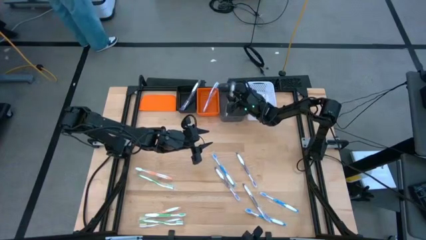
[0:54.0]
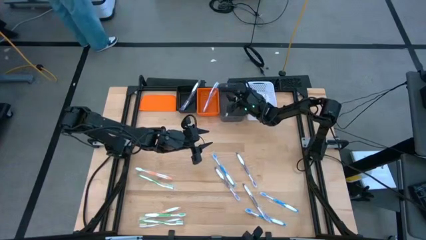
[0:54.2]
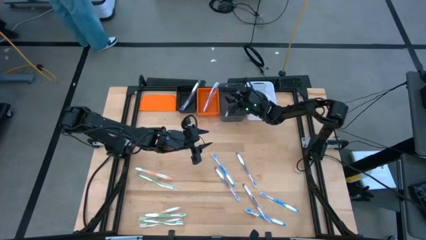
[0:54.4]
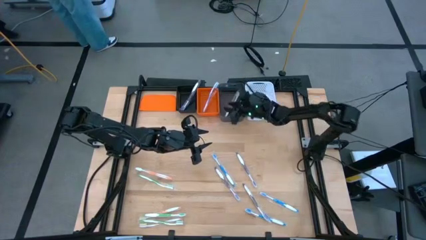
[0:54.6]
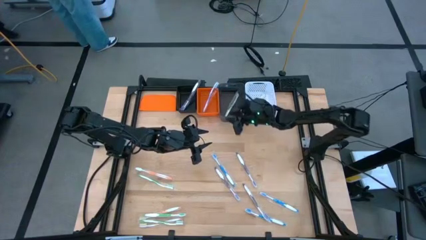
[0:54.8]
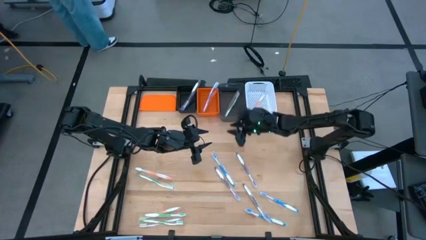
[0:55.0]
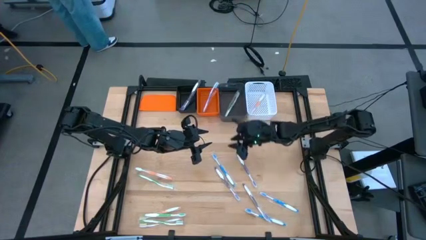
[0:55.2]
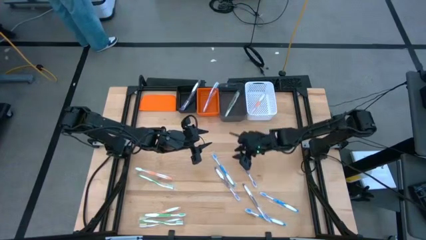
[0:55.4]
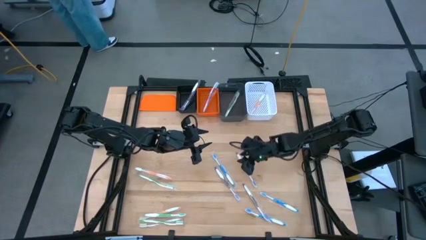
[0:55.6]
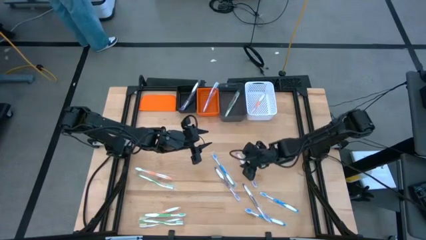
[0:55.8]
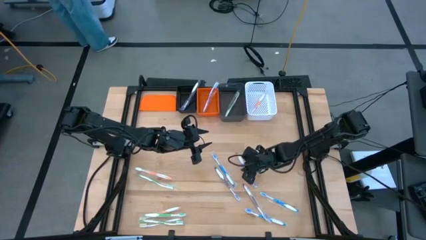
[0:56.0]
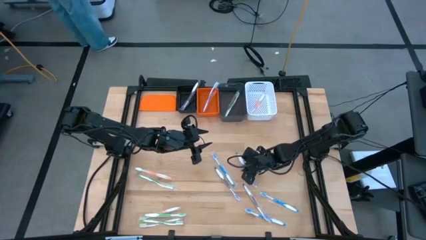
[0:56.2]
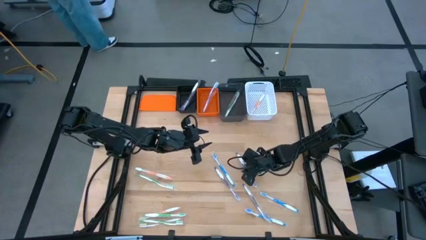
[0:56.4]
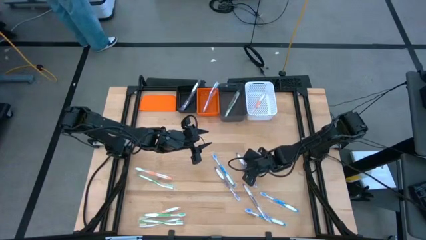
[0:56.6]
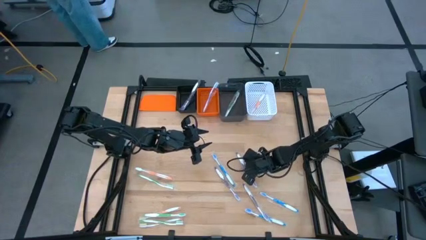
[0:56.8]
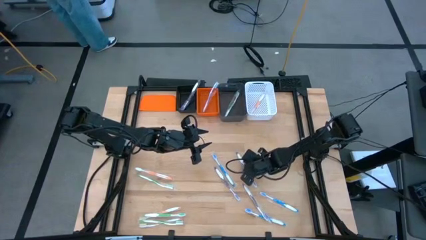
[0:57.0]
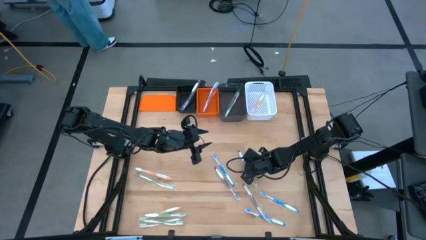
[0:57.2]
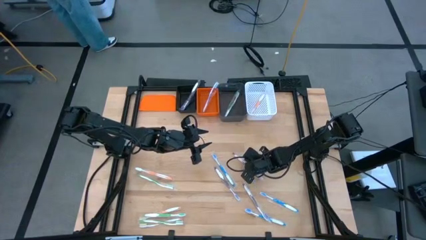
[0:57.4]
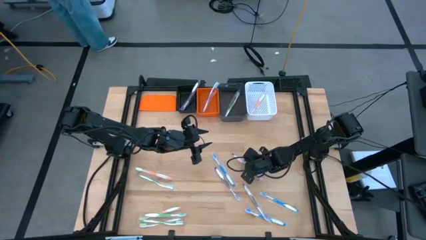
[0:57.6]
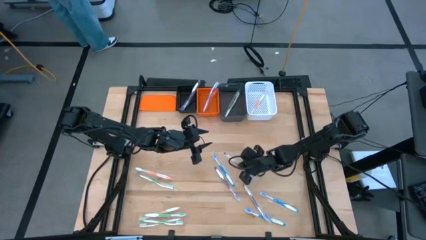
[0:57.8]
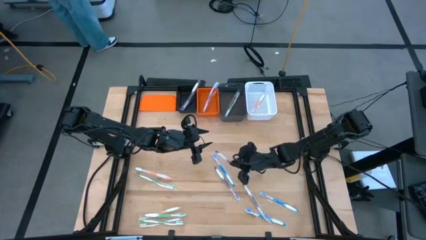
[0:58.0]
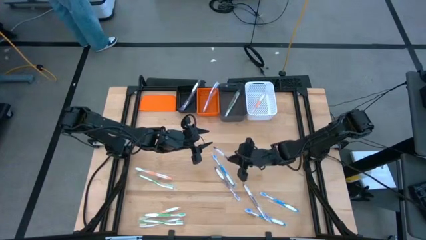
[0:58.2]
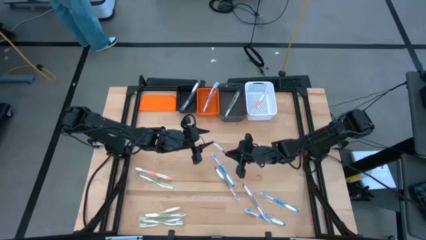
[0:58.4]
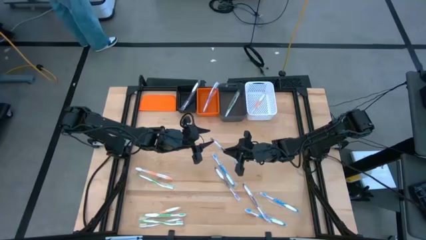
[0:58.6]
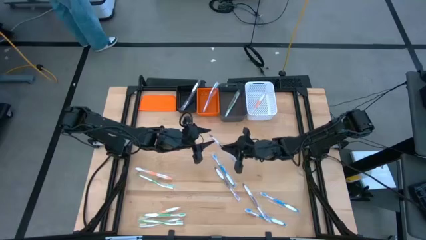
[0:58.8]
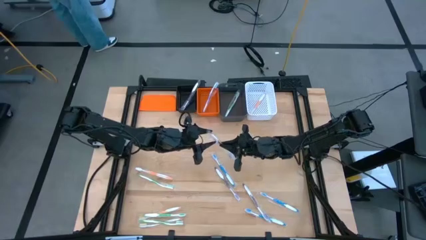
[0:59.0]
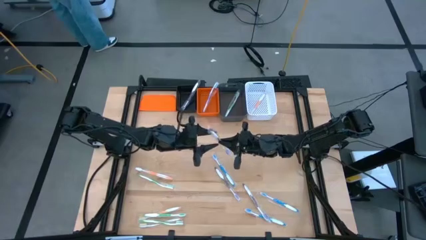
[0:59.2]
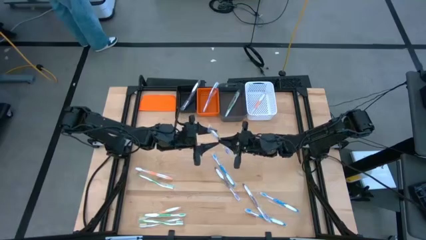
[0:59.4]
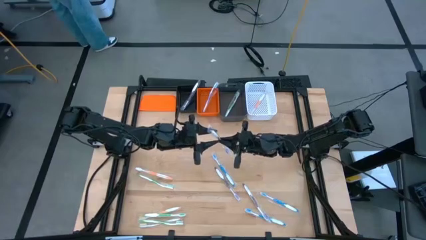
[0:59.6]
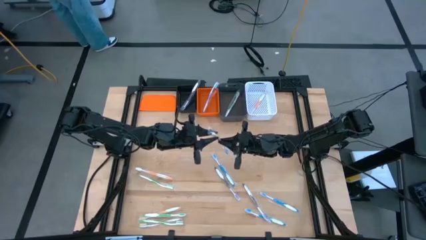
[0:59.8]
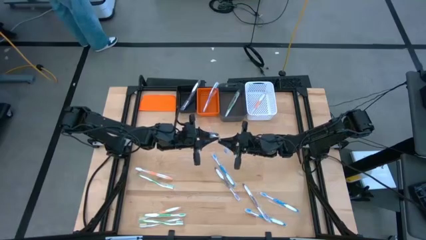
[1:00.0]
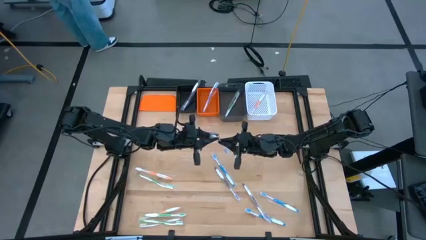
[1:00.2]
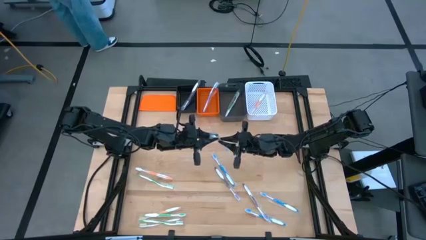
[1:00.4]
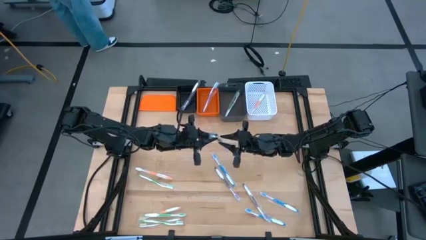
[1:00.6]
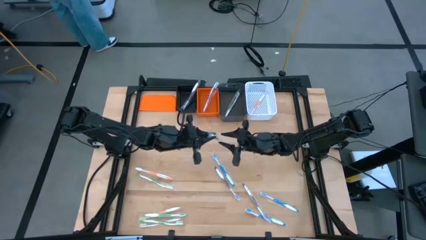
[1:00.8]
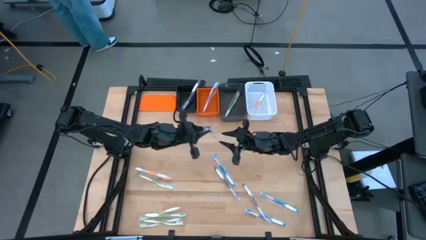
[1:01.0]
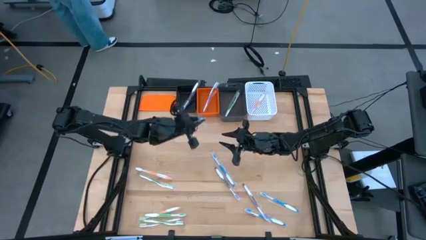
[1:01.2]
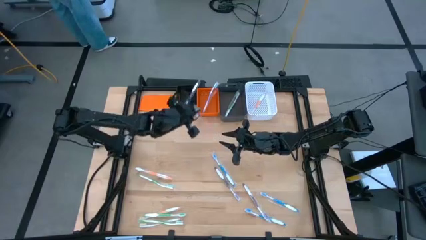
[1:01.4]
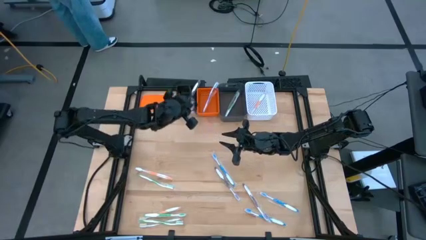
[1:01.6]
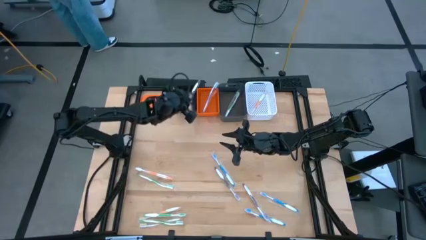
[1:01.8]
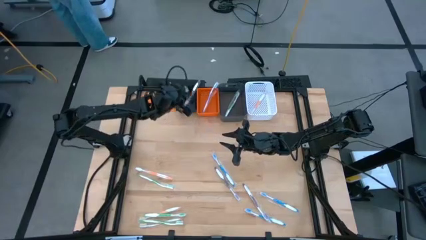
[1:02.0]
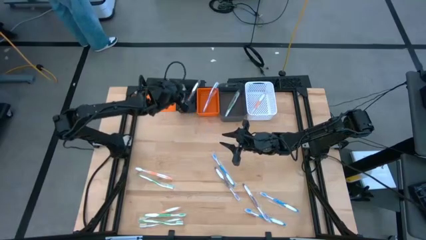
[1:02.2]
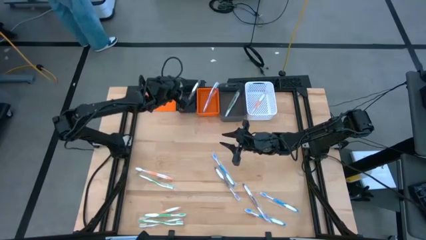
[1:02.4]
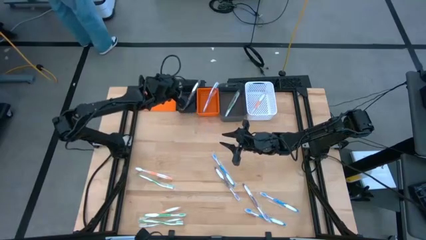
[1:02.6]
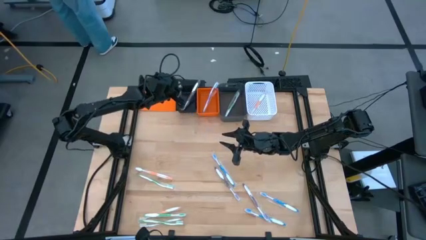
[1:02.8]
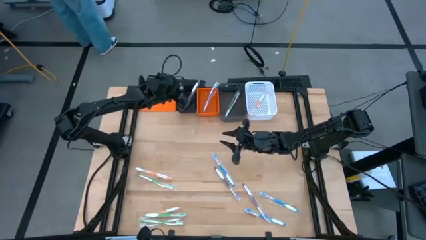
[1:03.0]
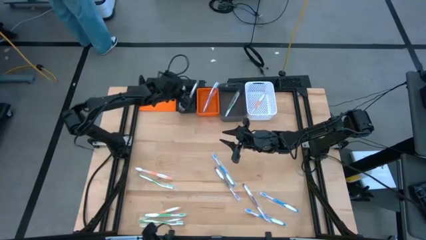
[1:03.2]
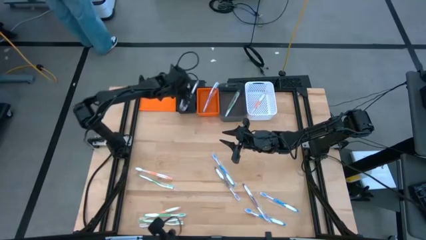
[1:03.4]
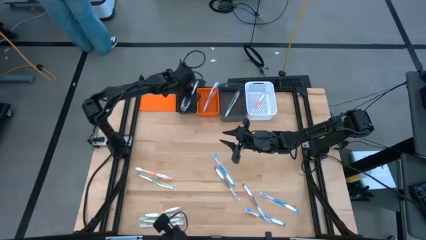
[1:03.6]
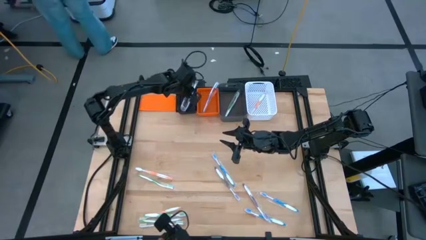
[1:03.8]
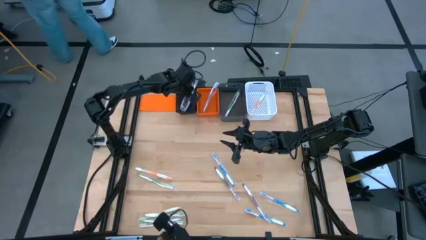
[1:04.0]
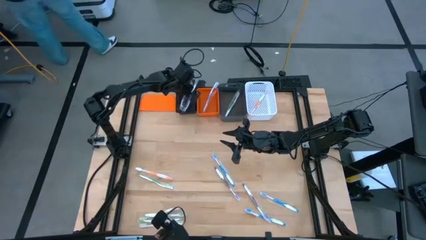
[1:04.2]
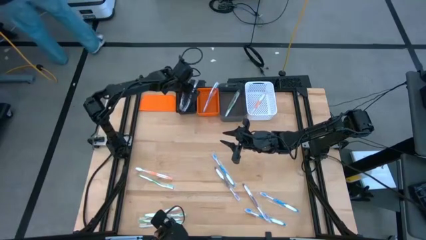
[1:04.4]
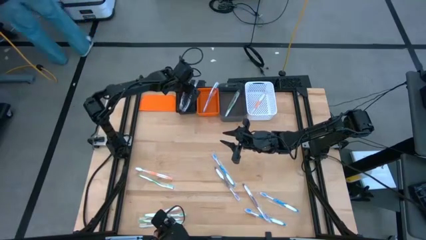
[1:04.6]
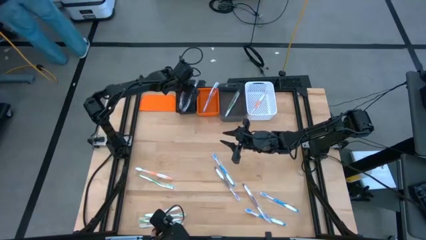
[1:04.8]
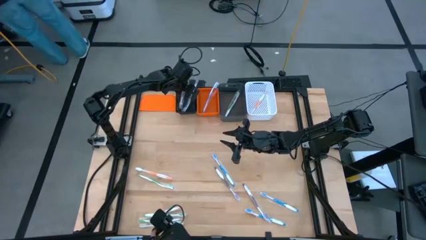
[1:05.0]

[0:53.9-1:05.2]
Task: Pick & Place Toothbrushes
Put the purple toothbrush into the black bin

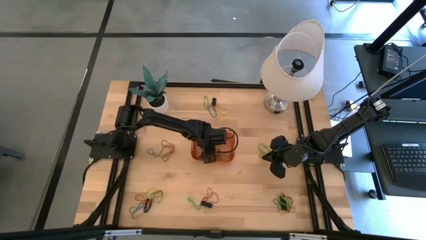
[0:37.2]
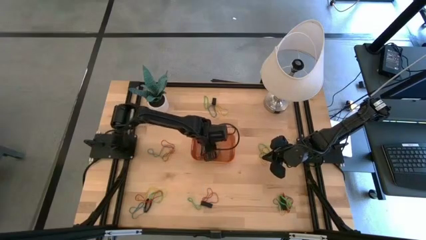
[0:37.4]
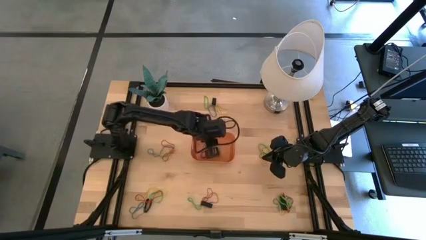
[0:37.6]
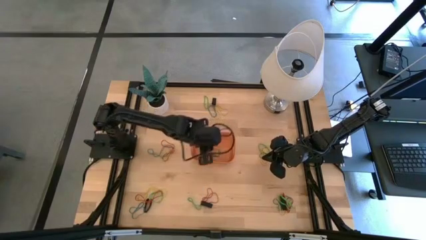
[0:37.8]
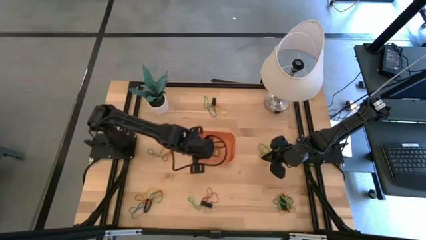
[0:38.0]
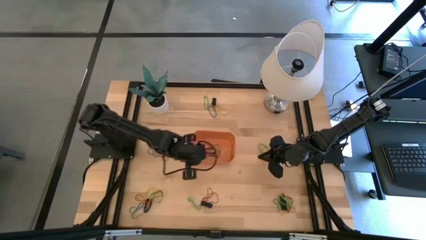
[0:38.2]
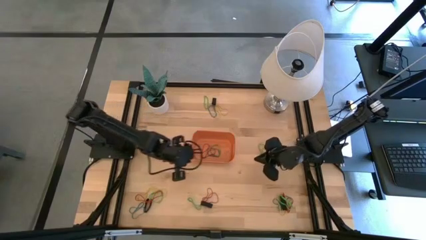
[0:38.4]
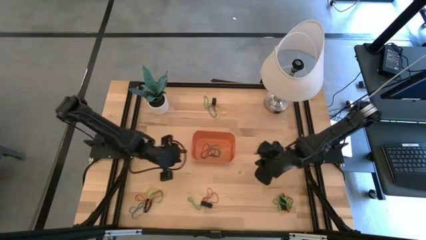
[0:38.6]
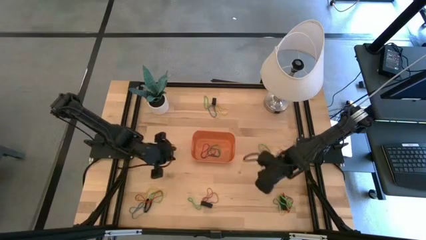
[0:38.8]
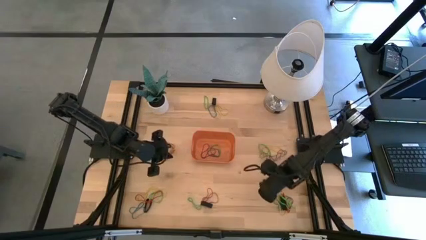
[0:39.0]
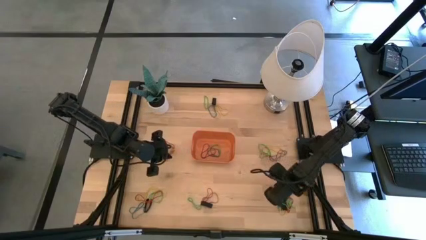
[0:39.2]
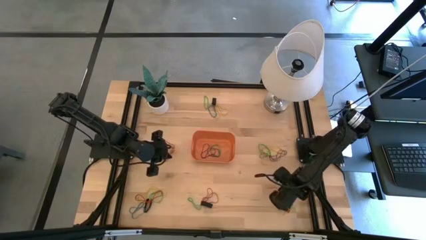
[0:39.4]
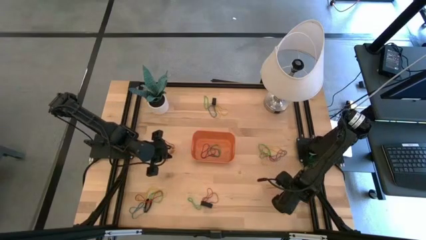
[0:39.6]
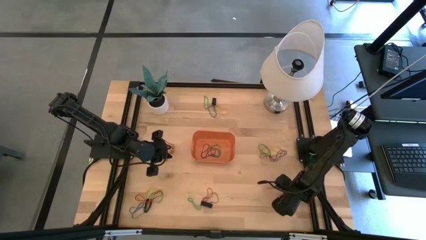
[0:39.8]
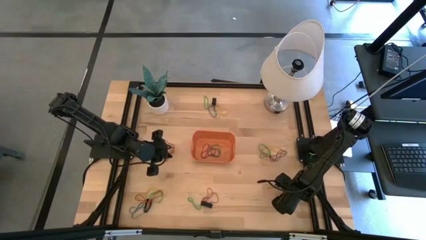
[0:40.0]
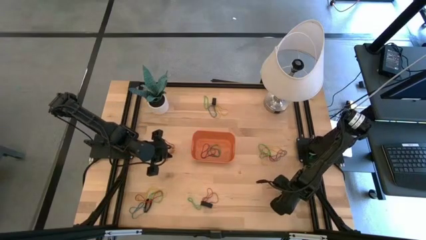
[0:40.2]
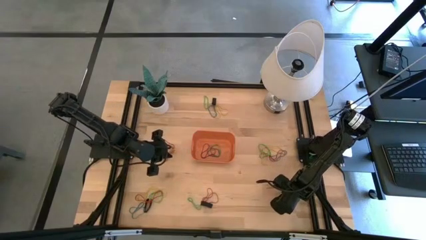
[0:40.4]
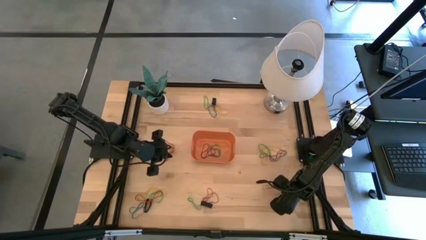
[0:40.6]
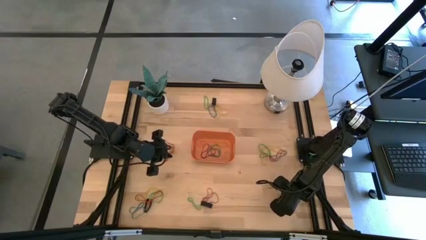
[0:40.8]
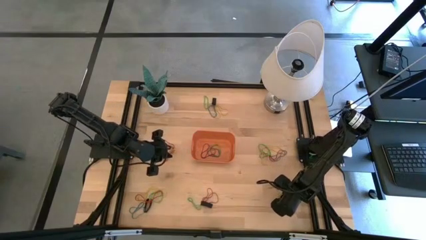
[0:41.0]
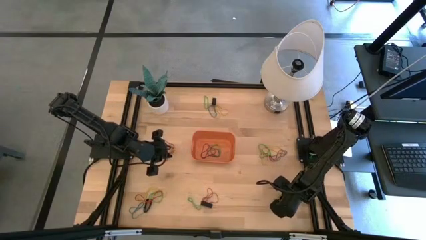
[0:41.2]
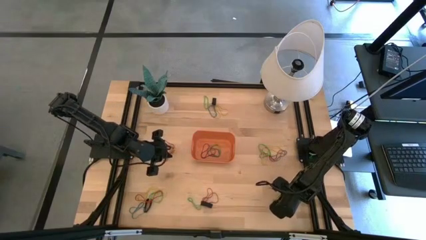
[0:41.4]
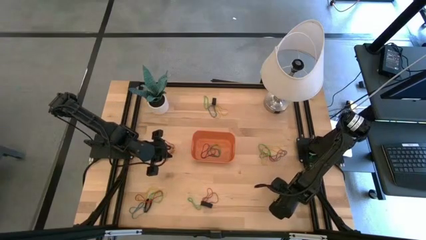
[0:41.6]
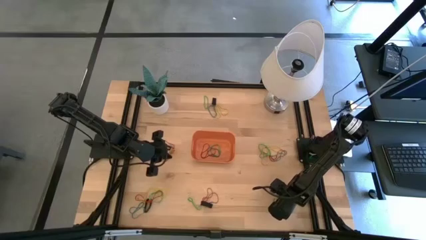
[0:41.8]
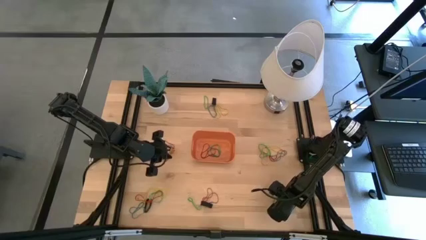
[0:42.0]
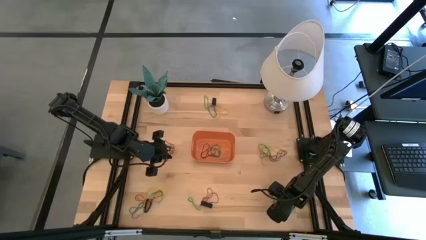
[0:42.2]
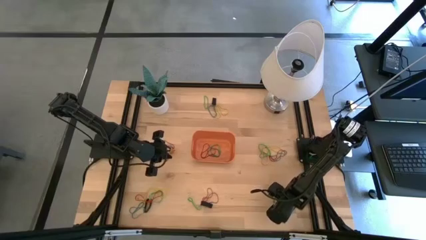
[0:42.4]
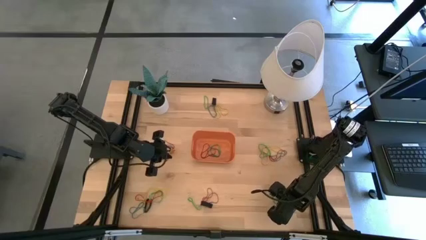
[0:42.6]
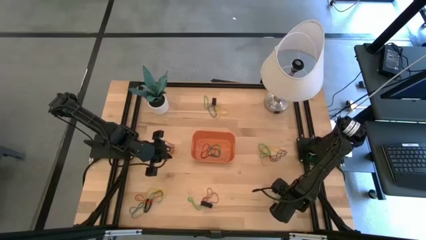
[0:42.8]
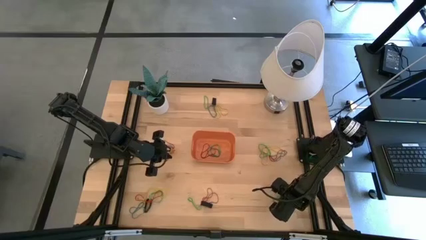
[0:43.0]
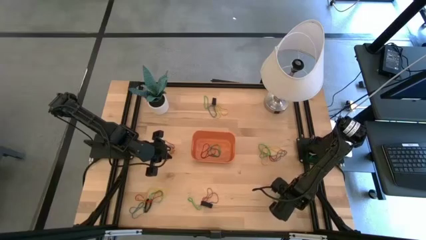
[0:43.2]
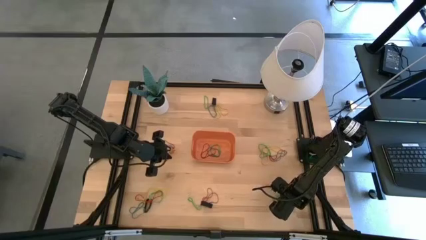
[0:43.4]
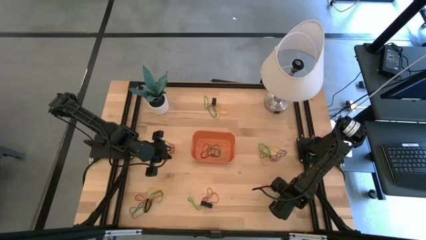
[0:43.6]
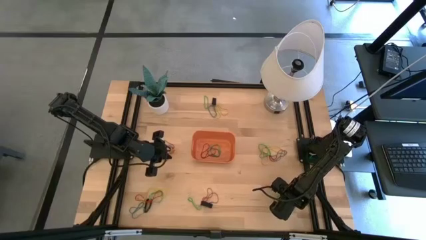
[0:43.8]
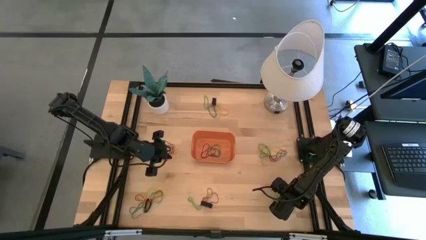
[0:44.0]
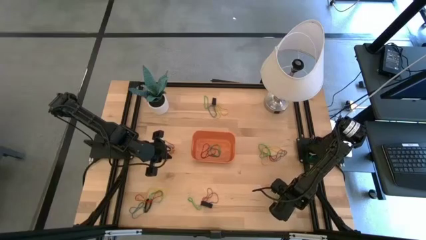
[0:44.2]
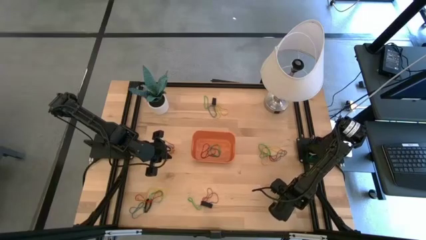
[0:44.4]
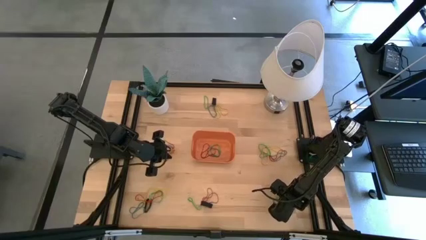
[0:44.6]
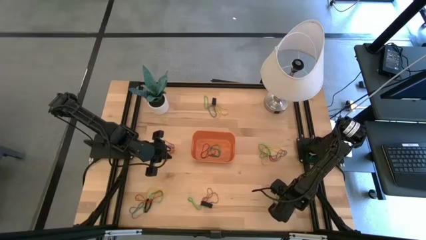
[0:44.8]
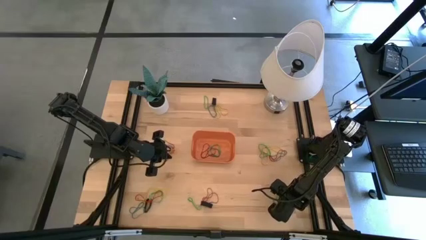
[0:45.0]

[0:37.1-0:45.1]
Task: Pick and place rubber bands into bin
Put the green rubber band into the orange bin
